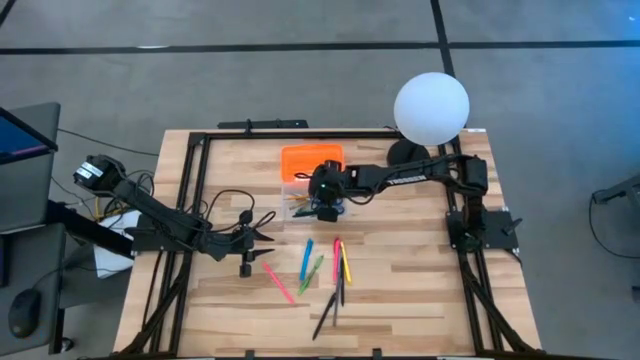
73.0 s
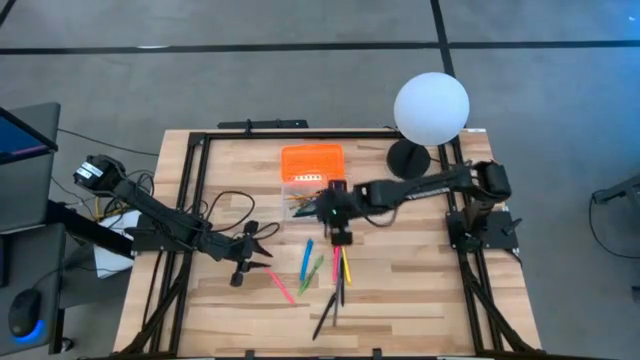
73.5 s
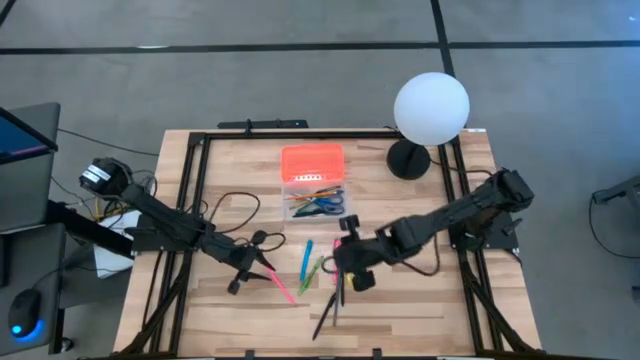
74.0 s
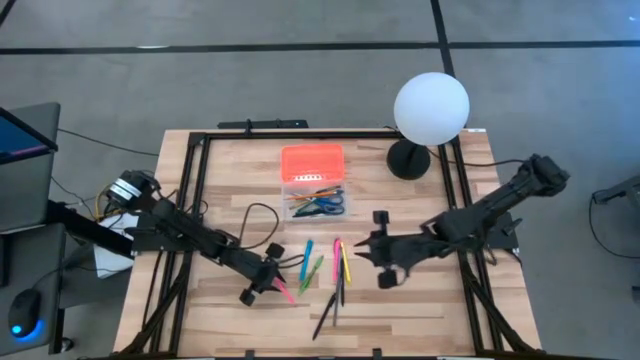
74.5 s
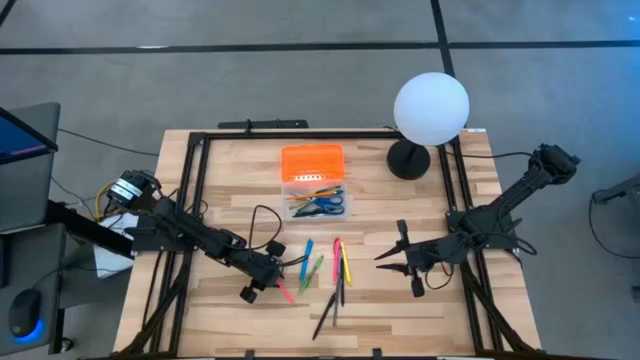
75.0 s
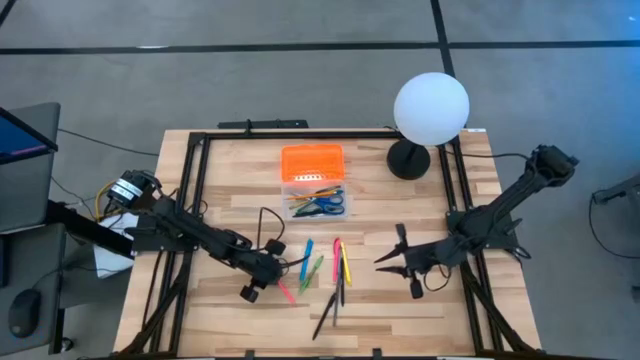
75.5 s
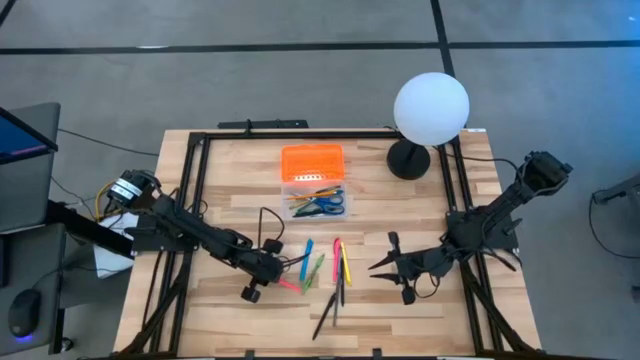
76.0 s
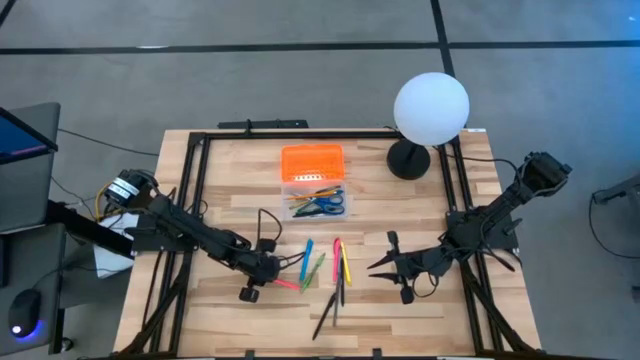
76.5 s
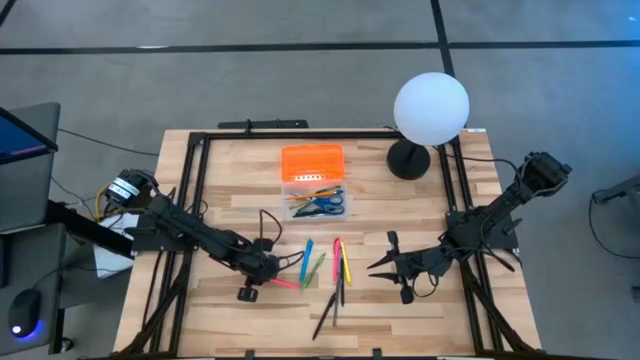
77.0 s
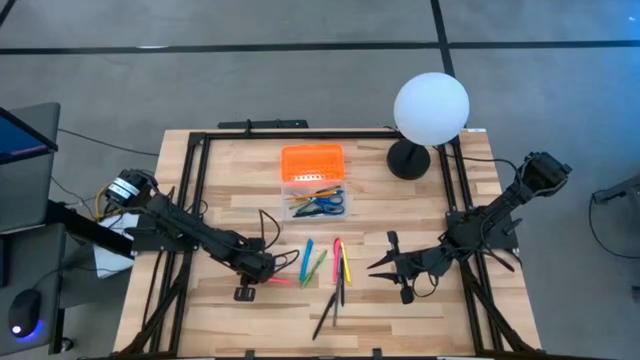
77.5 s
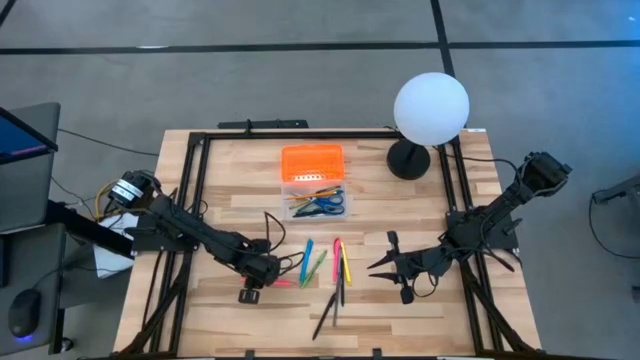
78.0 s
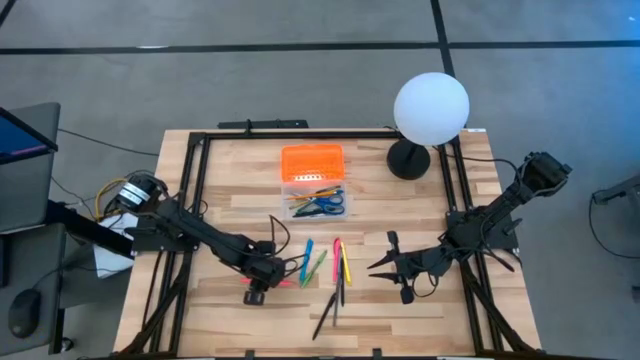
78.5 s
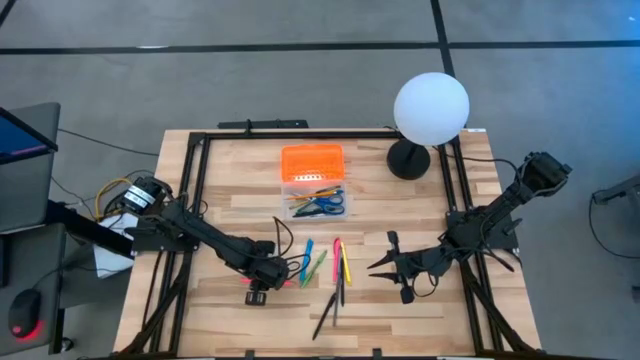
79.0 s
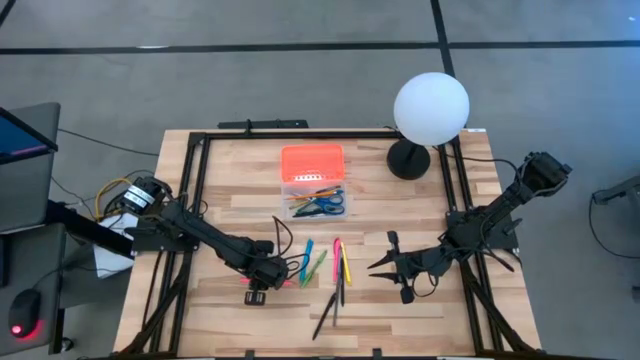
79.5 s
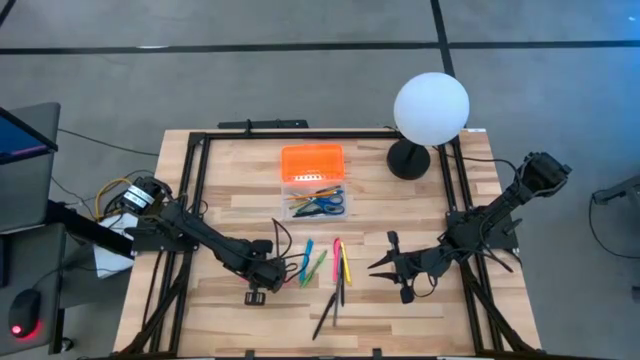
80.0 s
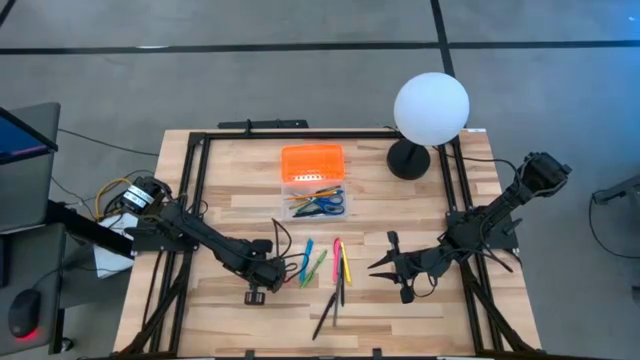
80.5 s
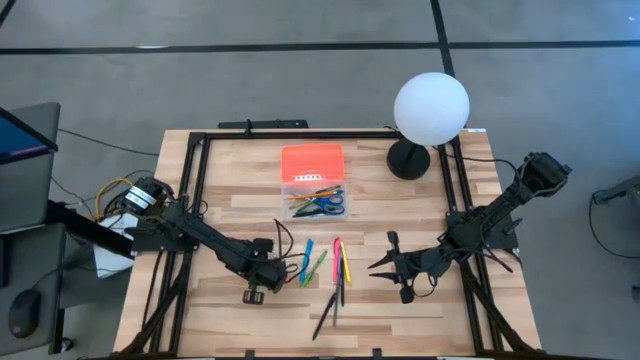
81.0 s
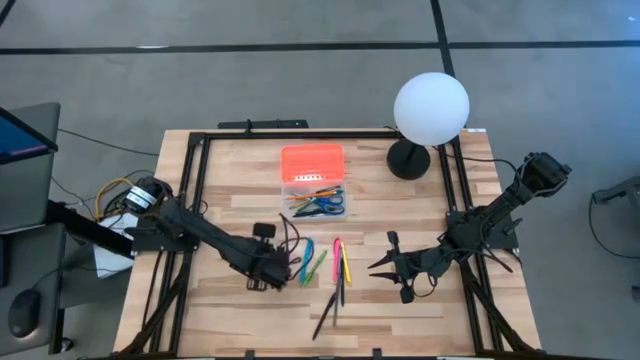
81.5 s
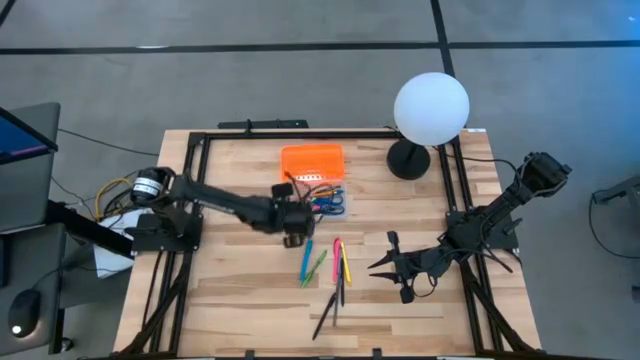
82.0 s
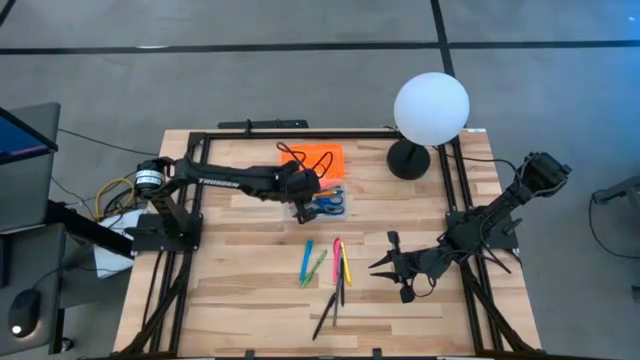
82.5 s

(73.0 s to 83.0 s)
Task: Pick & place school supplies into a supply box
Put the pink pencil into the supply box

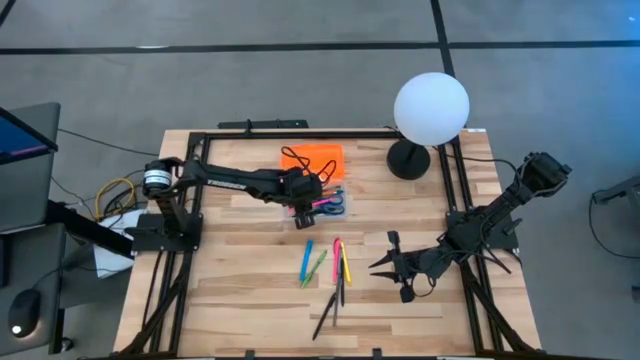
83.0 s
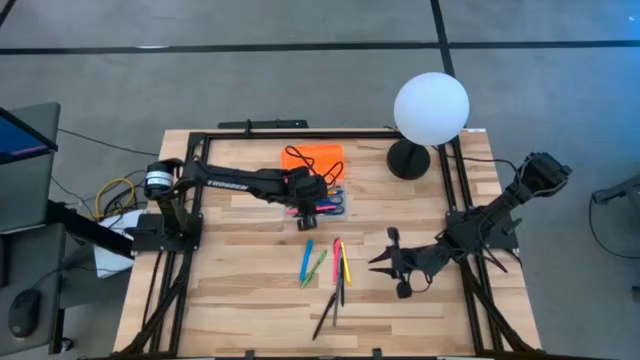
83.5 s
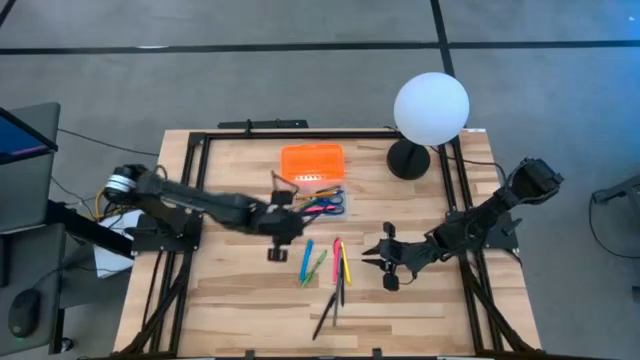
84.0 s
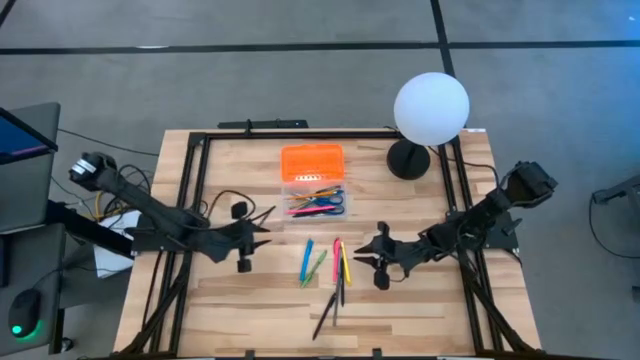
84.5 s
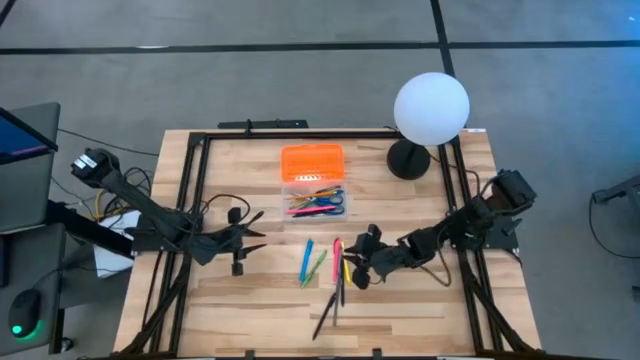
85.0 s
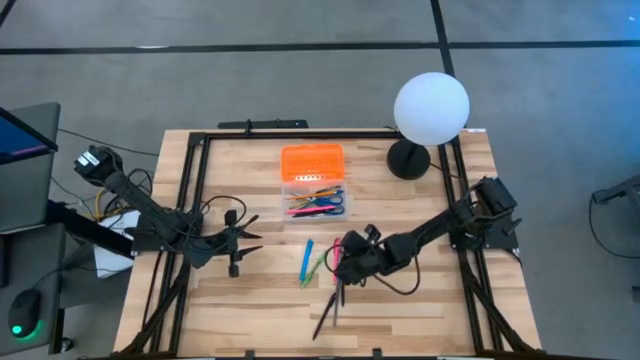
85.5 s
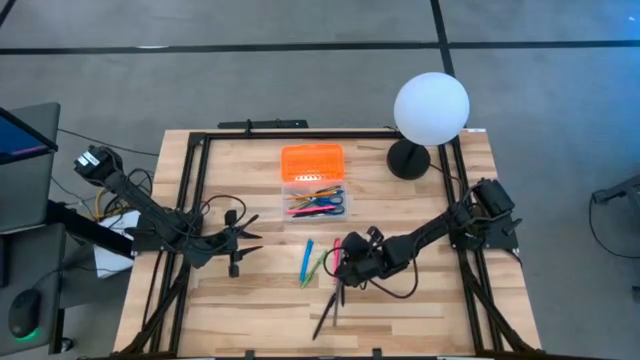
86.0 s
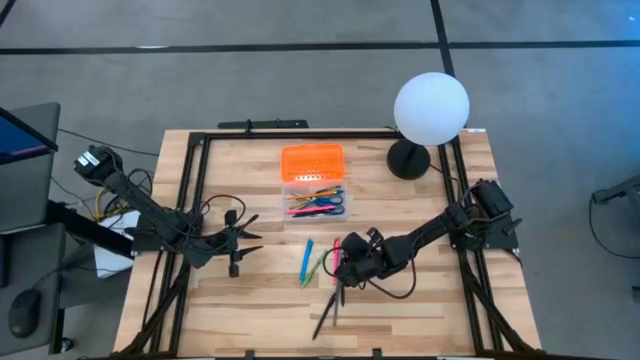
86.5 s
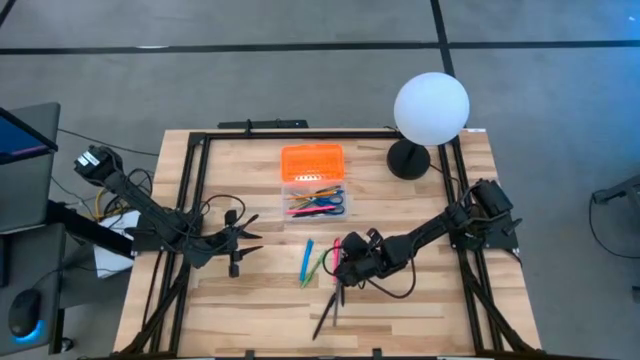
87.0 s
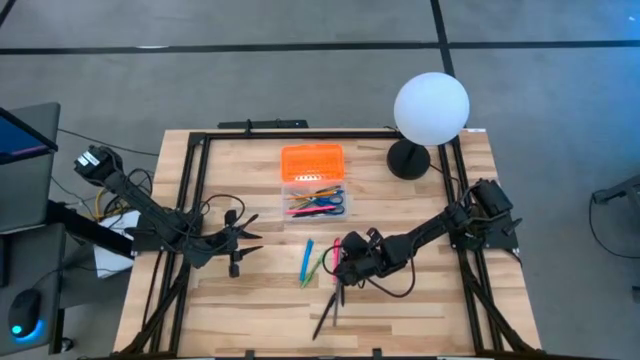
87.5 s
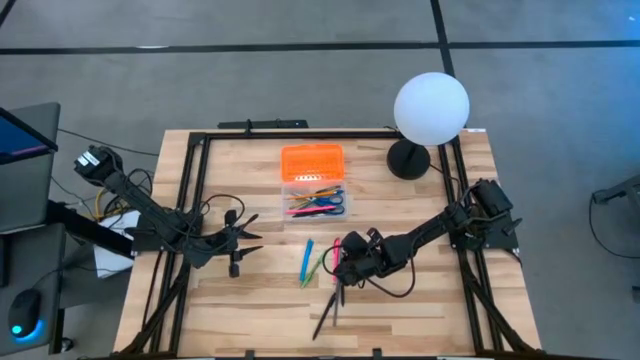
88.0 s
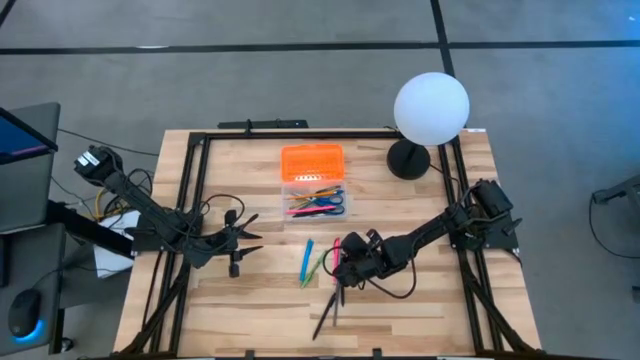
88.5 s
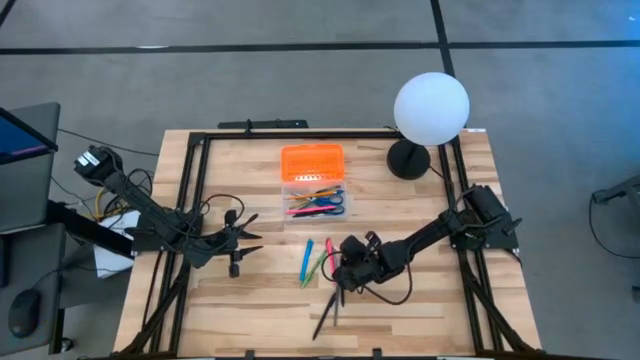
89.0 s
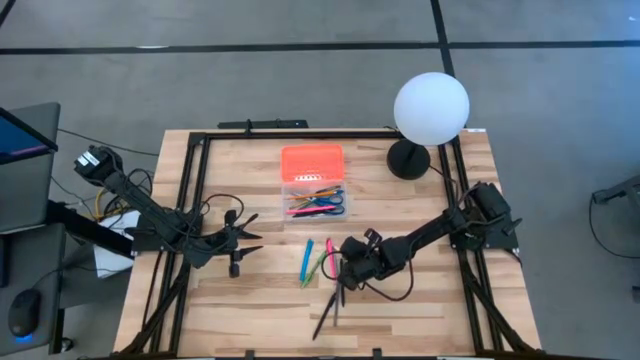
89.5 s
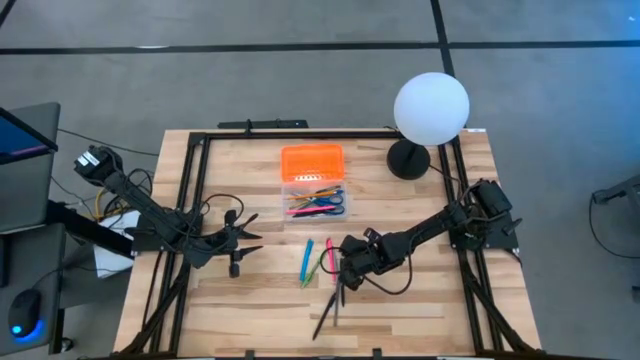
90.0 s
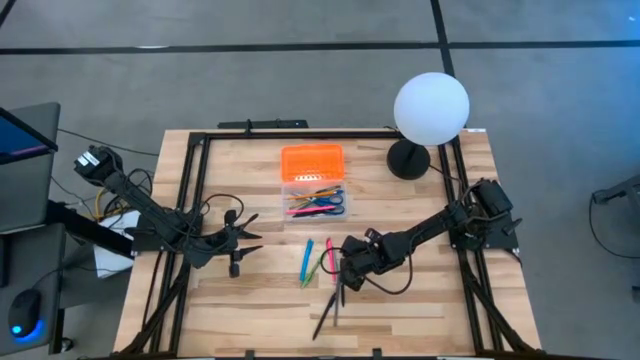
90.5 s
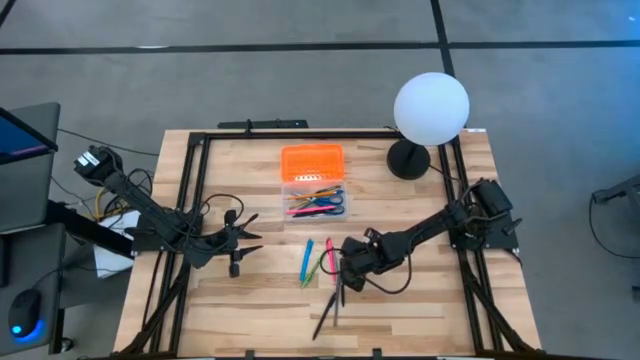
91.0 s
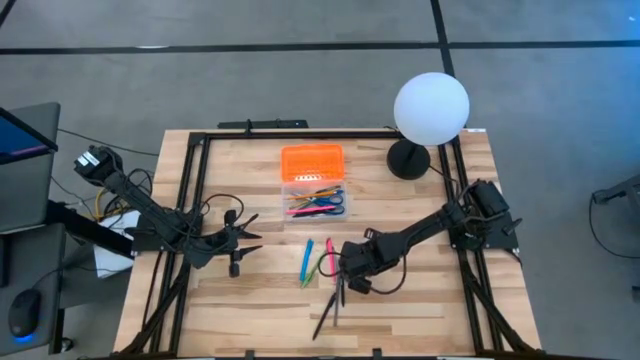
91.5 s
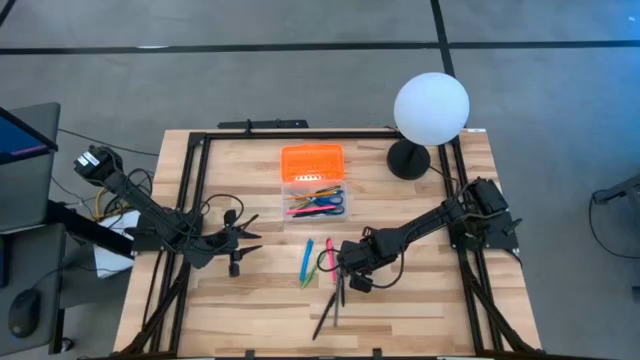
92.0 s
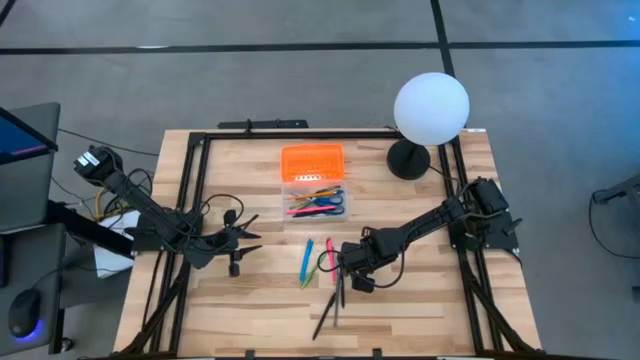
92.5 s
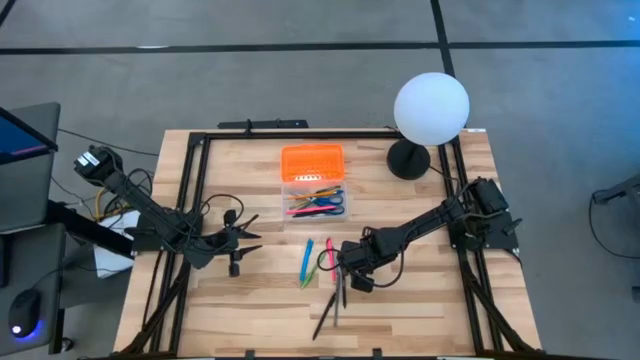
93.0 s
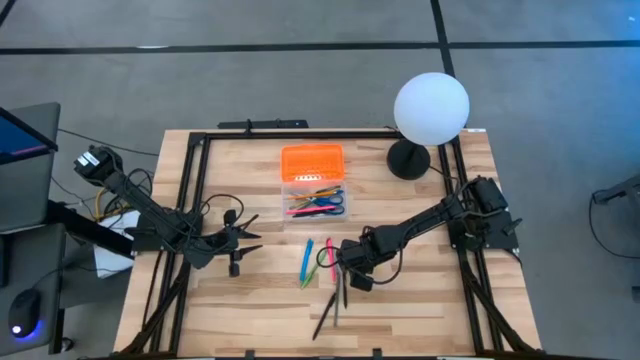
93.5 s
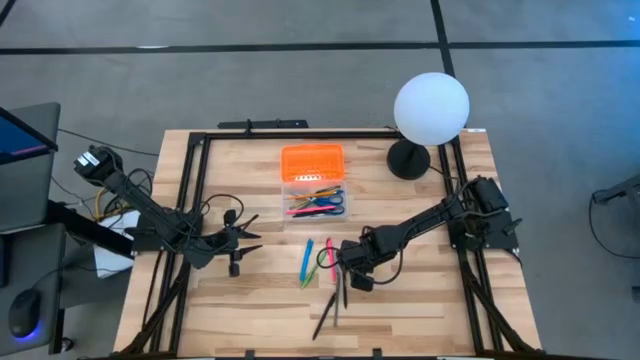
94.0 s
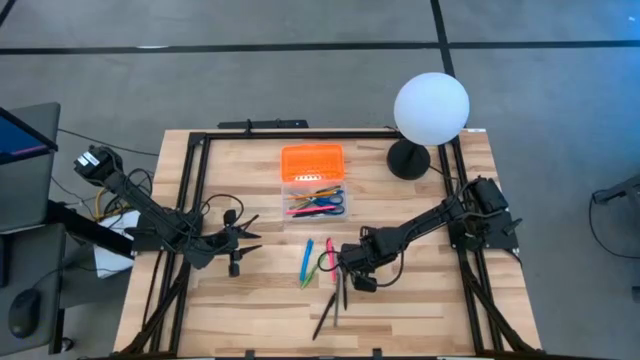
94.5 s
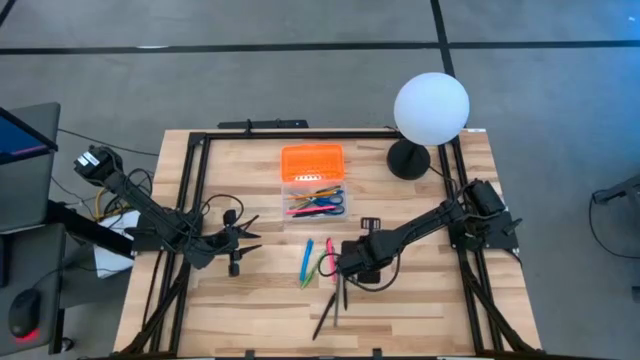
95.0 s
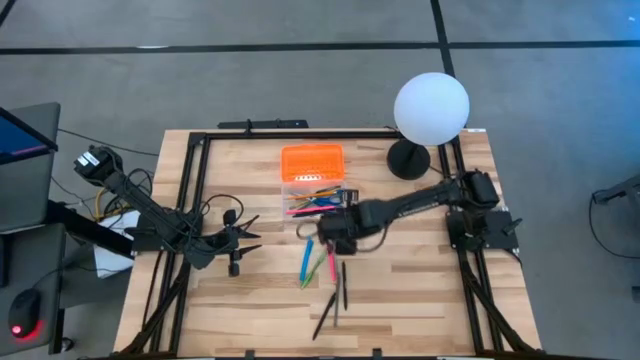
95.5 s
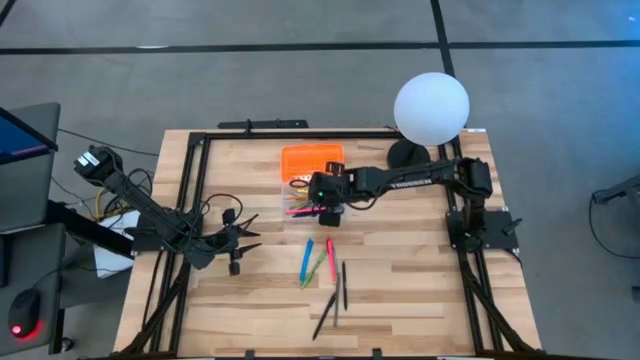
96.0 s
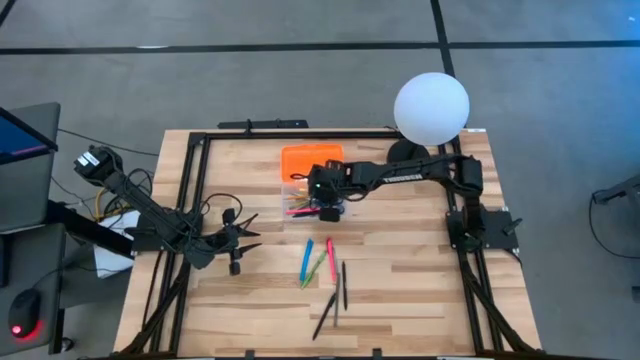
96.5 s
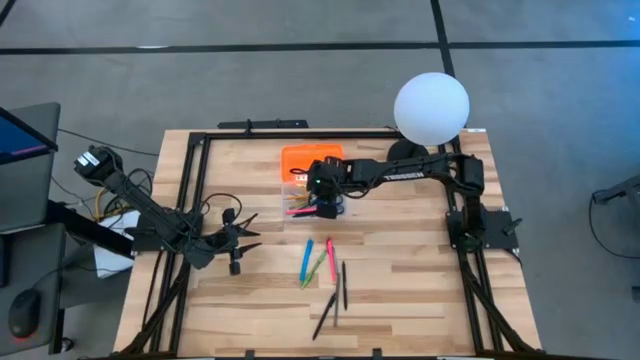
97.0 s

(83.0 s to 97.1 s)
Put the yellow pen into the supply box
